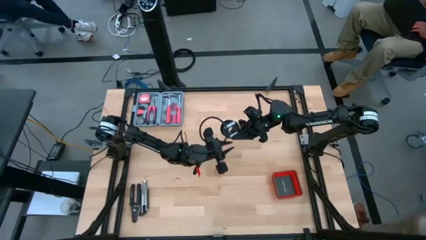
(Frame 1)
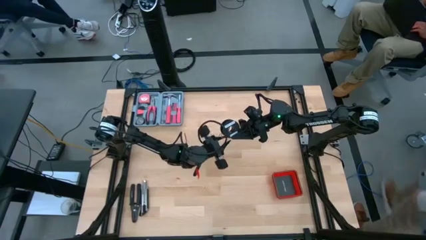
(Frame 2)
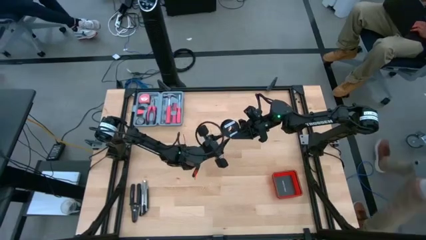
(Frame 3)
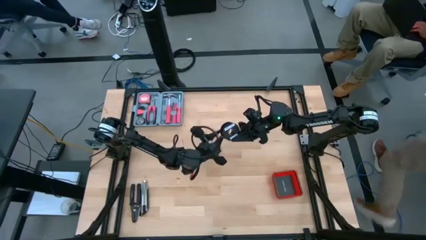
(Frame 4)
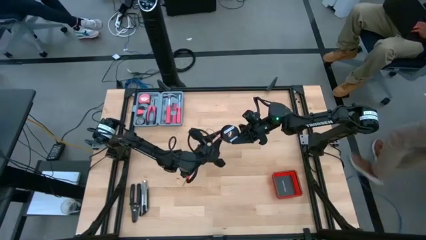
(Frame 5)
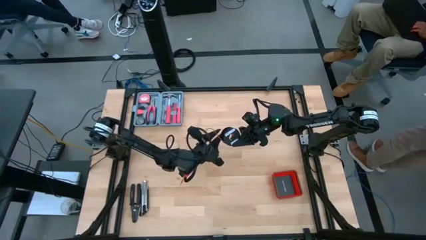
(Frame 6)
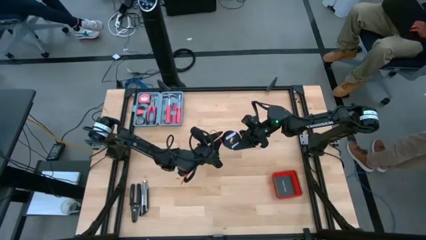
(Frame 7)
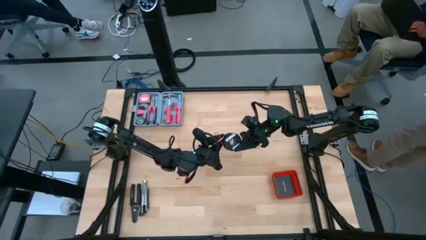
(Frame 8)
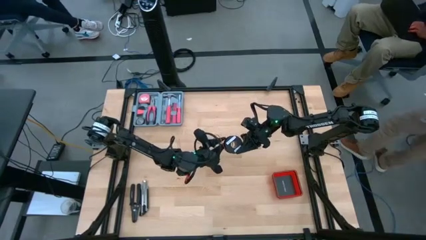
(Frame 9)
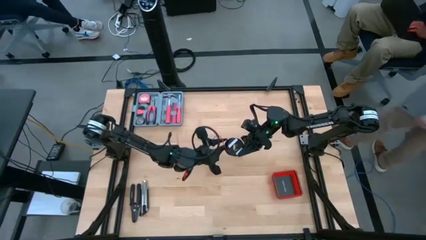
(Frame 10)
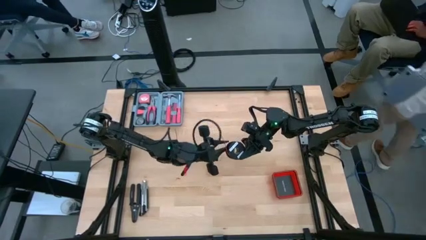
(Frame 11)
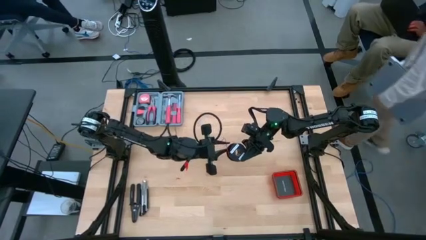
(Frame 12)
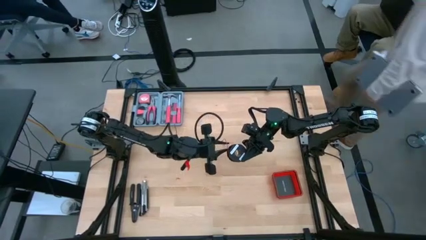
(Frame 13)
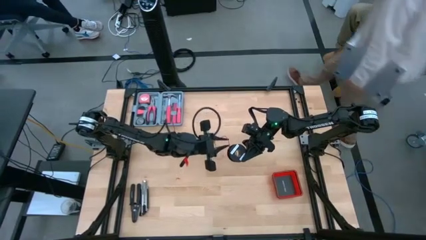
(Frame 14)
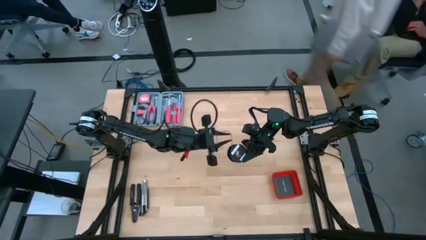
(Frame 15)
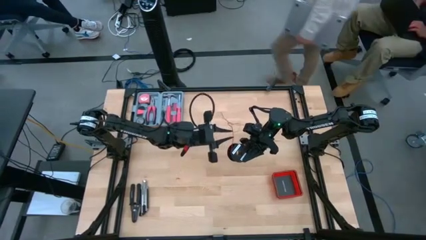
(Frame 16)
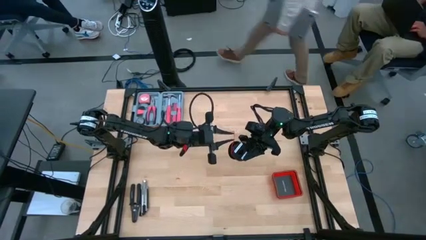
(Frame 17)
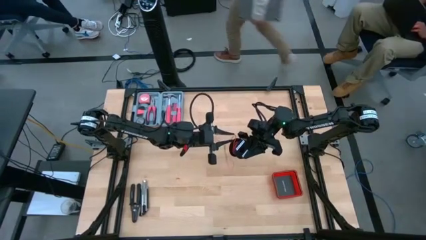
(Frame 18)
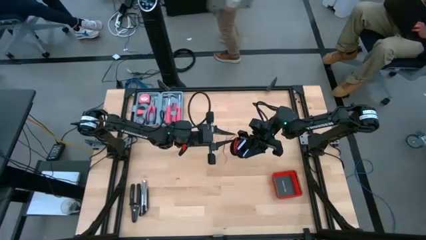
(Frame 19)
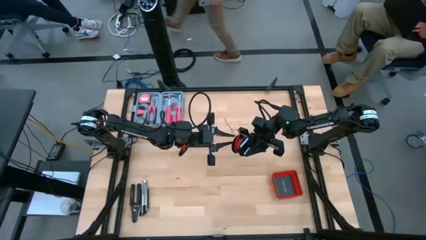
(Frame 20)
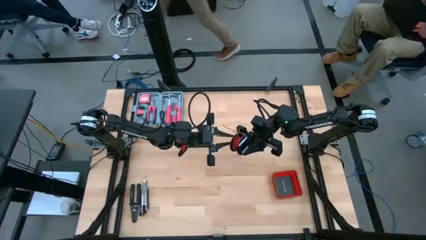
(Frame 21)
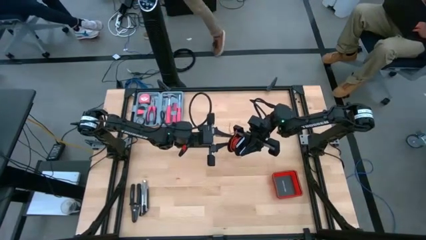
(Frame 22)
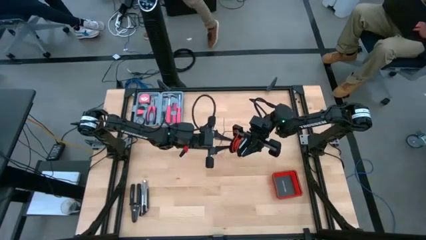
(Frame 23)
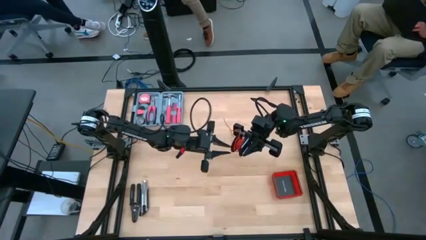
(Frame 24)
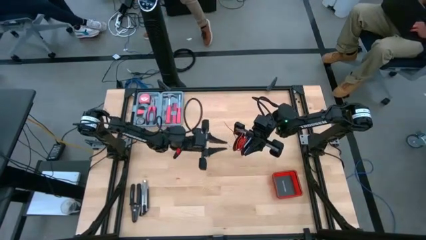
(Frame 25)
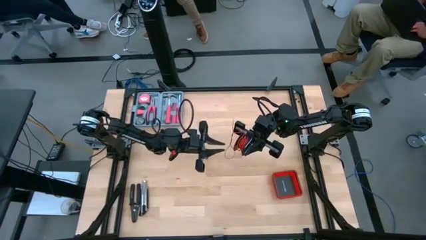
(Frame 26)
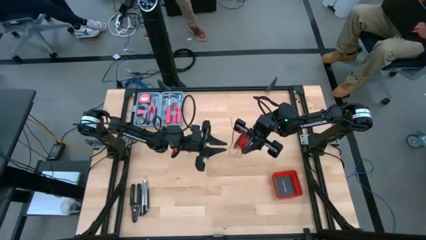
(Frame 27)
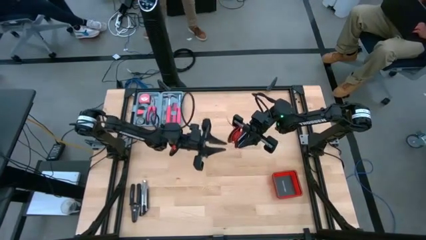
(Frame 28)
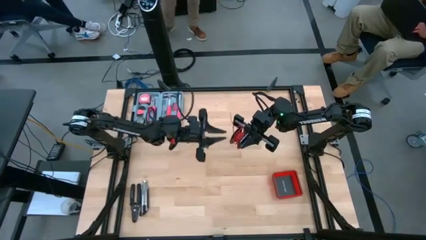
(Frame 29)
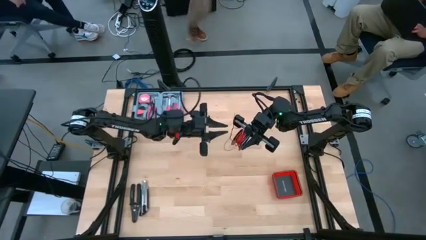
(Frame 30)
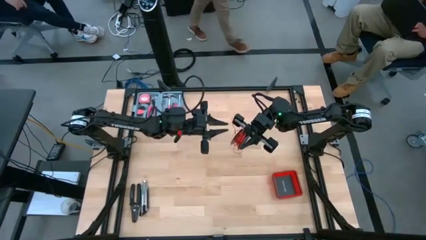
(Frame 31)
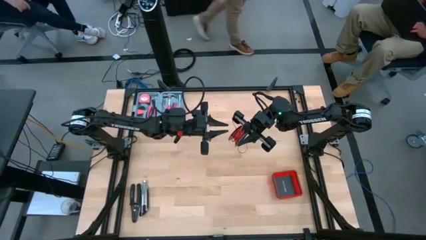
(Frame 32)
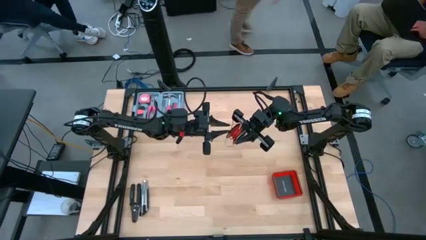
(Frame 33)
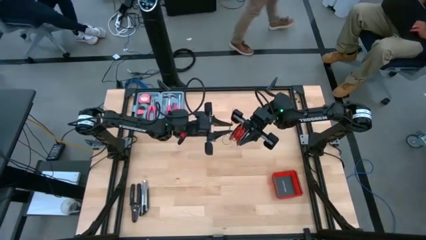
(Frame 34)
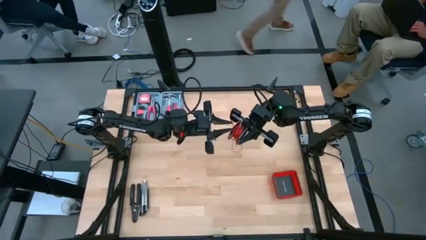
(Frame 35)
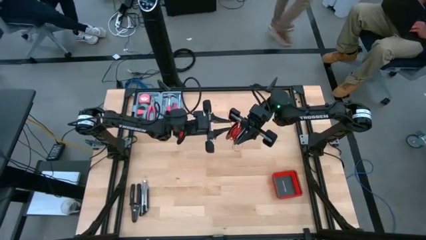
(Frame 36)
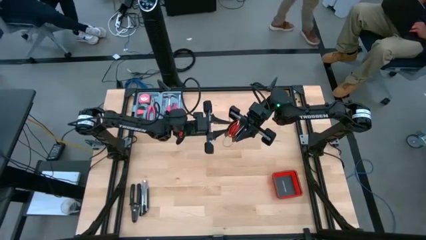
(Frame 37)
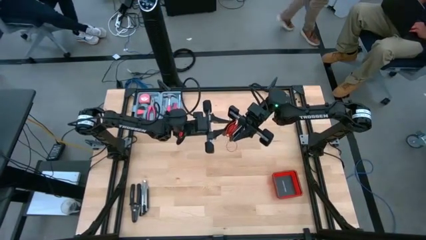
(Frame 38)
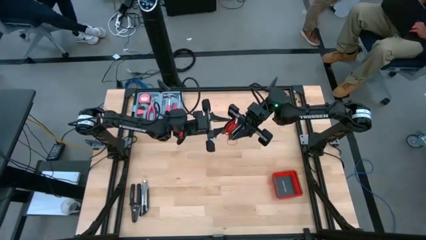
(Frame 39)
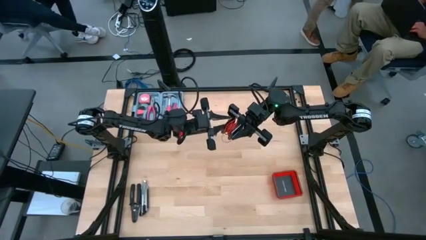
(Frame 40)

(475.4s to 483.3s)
Task: Coil cords
Coil the red wire onto the spool

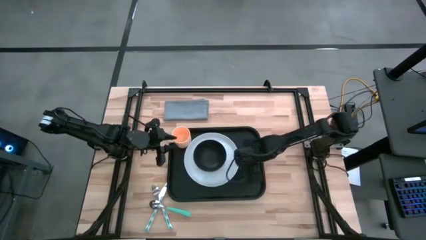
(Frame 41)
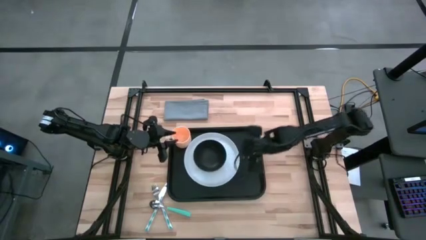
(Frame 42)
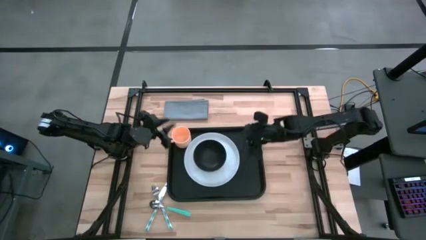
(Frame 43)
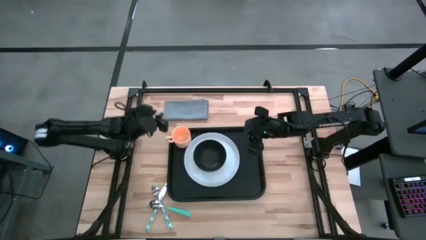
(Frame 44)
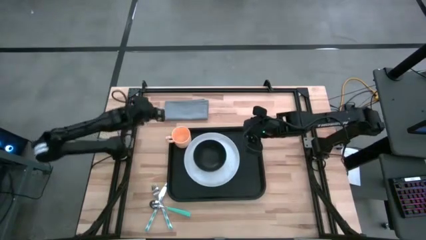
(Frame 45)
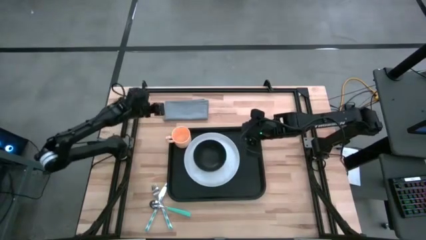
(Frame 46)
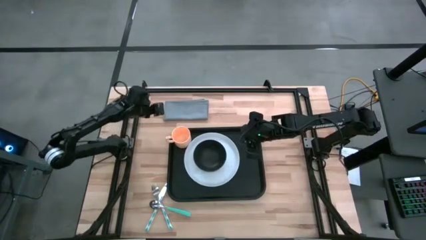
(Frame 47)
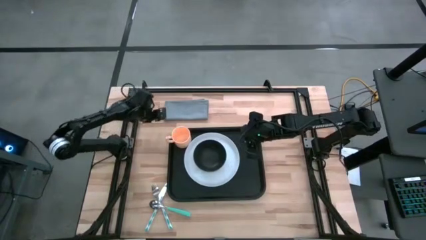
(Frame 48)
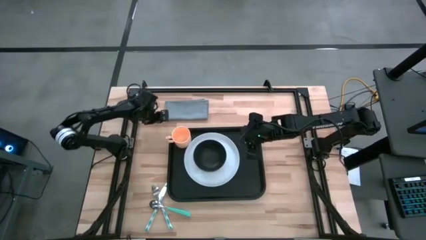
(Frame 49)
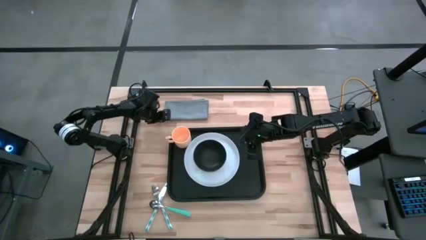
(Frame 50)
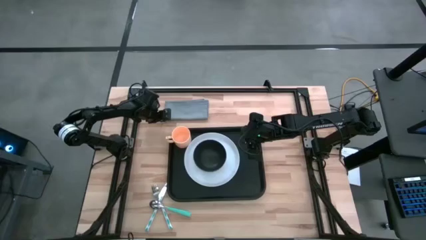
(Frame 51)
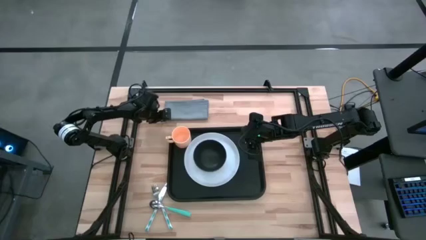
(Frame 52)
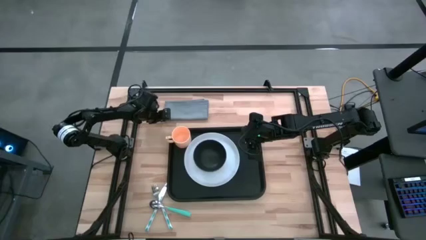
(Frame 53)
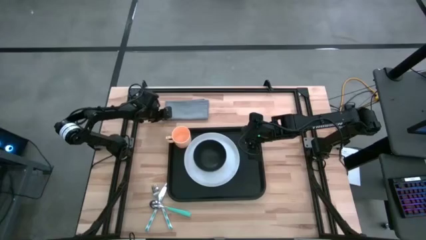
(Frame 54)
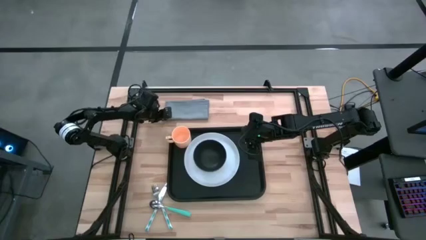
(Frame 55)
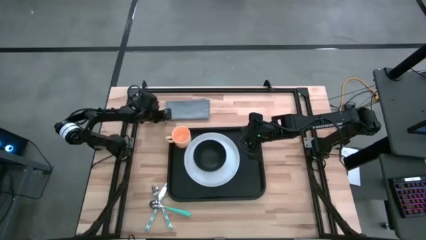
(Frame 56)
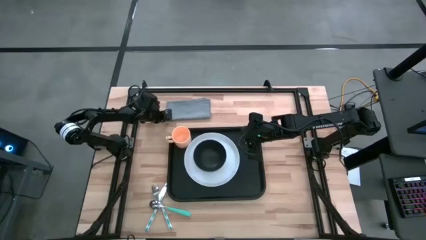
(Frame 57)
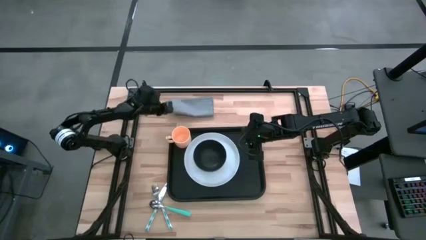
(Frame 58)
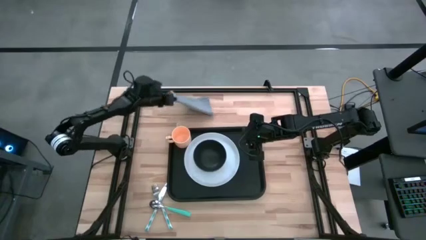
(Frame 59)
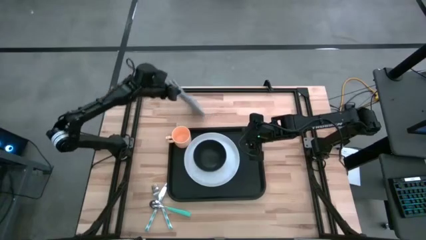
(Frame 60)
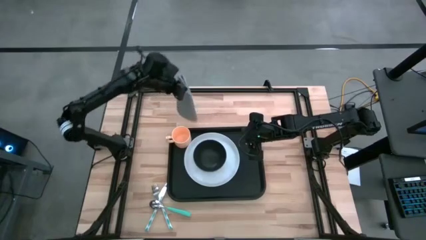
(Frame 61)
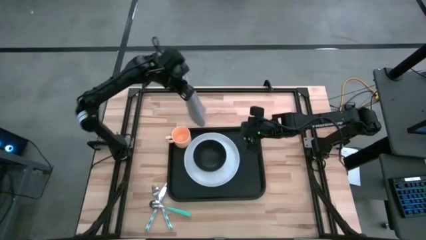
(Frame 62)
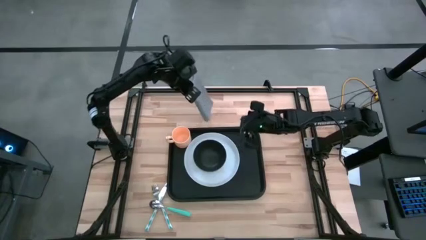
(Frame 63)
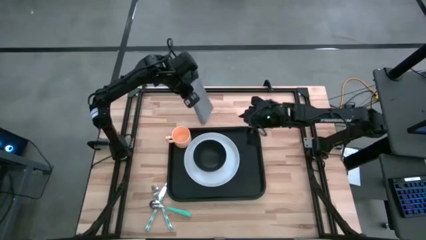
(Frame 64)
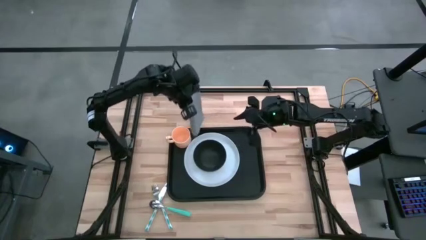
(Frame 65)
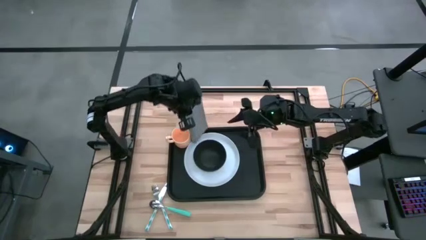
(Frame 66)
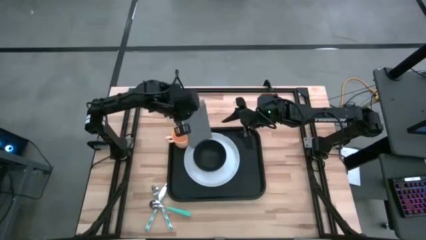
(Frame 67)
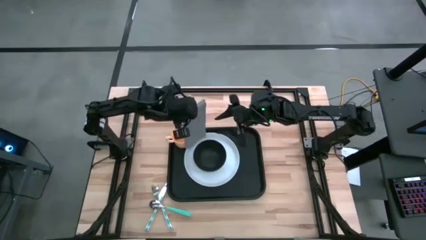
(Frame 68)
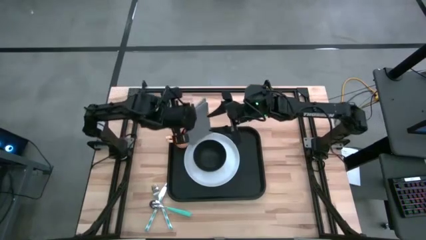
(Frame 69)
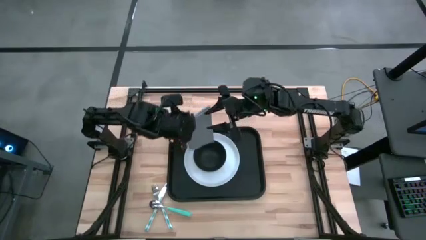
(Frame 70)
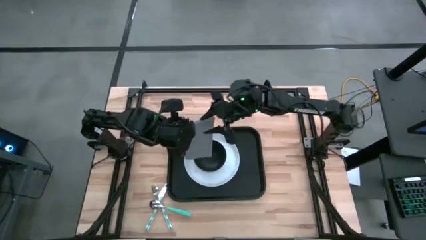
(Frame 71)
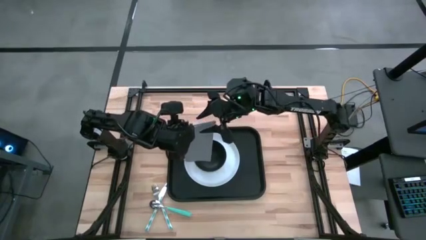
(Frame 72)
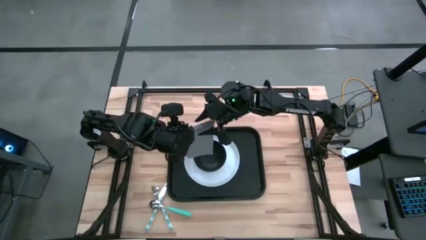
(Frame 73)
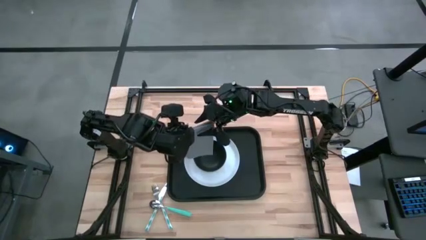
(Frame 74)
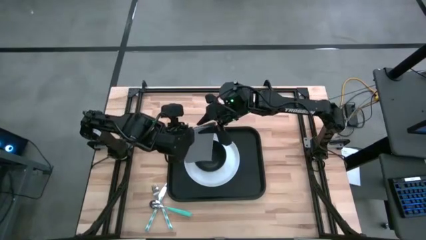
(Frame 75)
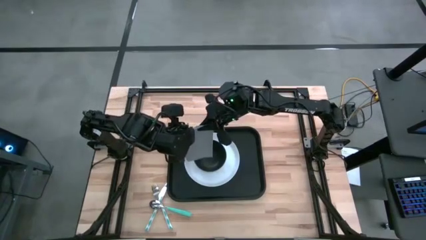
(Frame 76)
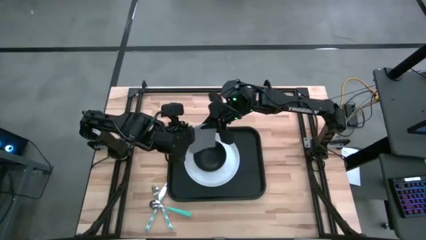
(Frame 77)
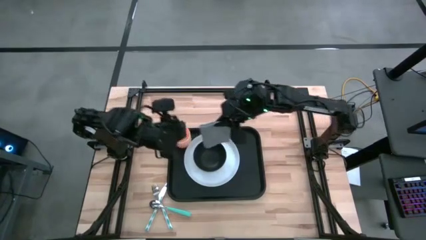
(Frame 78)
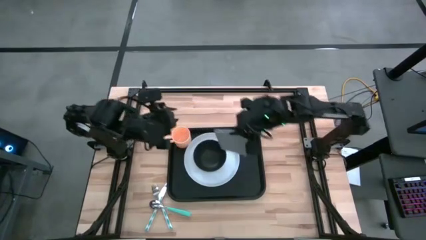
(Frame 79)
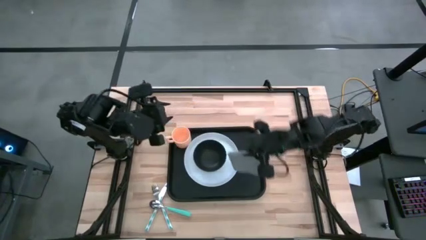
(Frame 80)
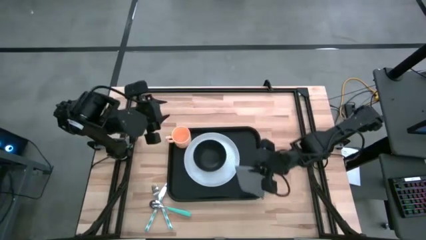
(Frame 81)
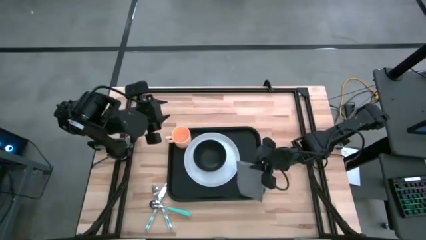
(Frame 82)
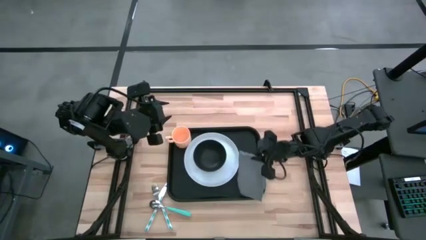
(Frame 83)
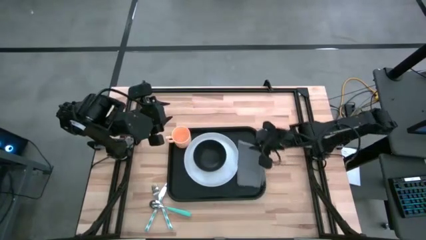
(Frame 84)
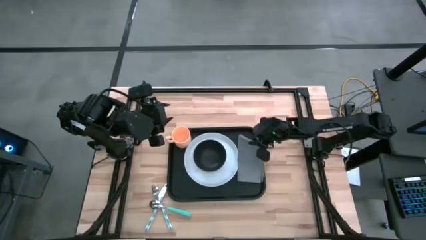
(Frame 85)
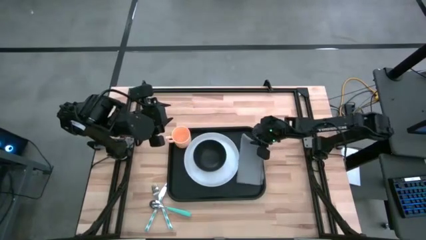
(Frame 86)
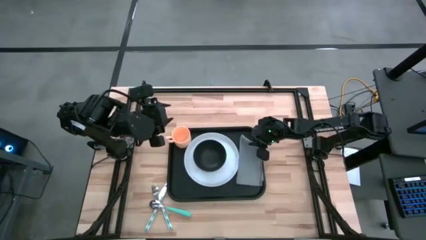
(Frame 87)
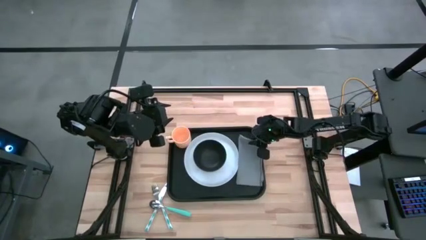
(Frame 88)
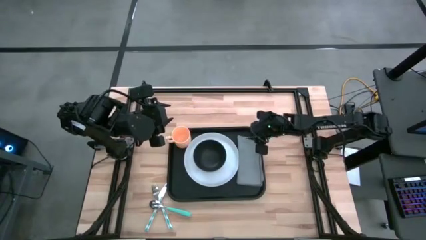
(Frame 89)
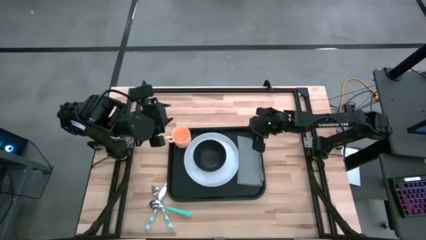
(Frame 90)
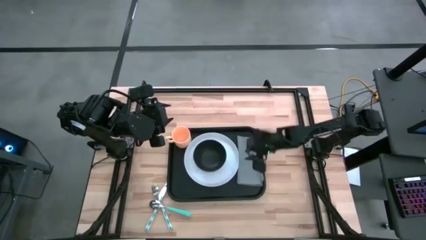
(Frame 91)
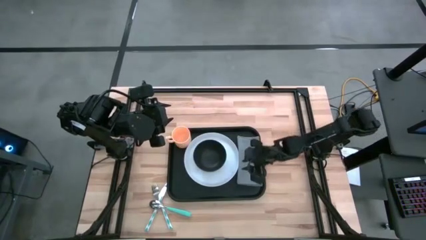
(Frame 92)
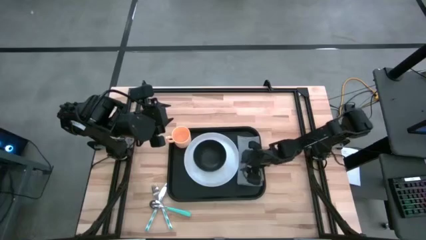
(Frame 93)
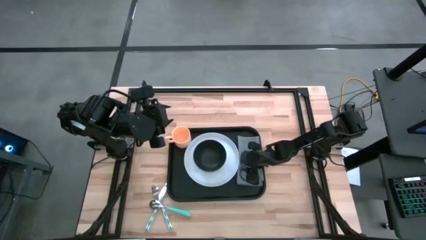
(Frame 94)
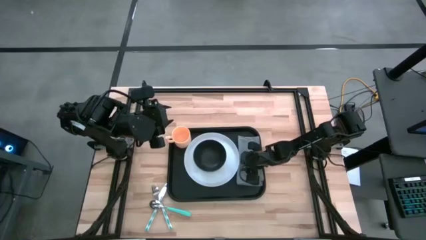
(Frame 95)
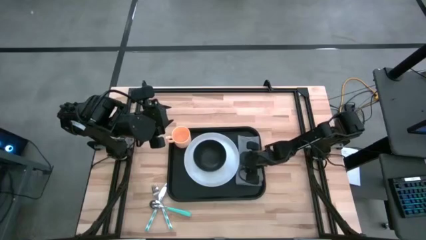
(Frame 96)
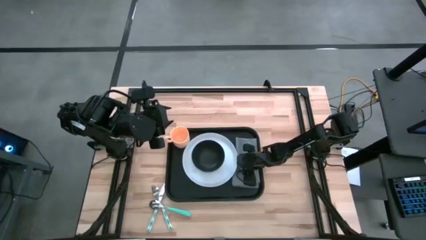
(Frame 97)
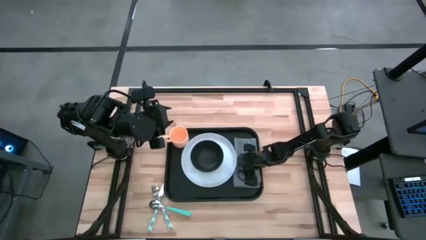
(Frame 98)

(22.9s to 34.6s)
Task: Set up tray
Put the gray napkin to the right of the white plate on the black serving tray
